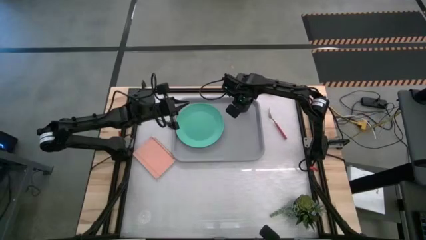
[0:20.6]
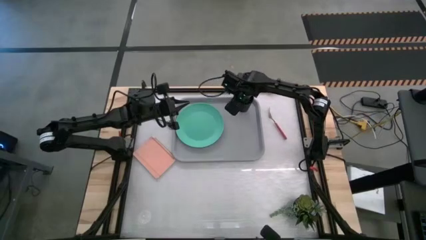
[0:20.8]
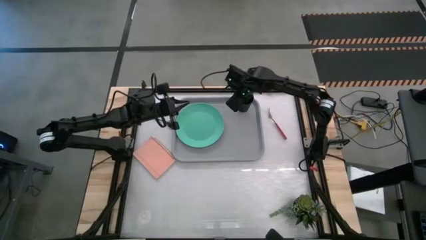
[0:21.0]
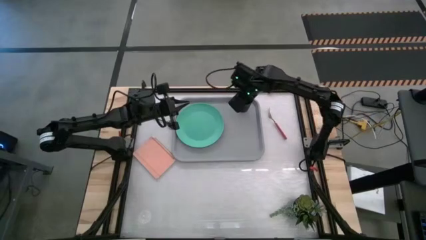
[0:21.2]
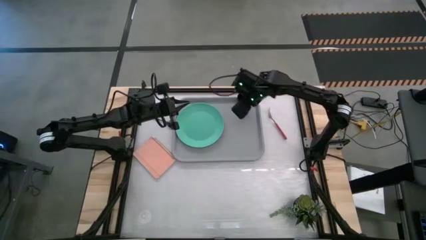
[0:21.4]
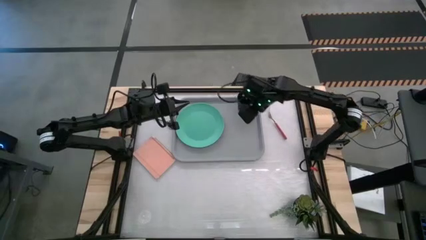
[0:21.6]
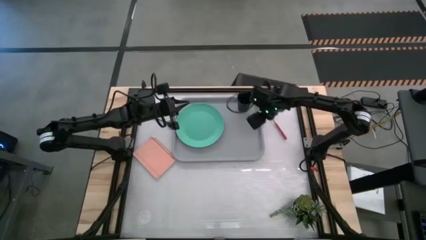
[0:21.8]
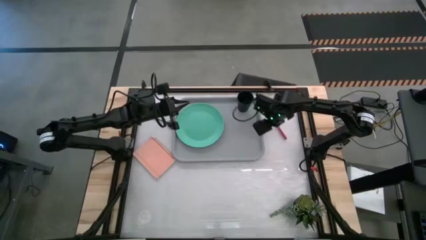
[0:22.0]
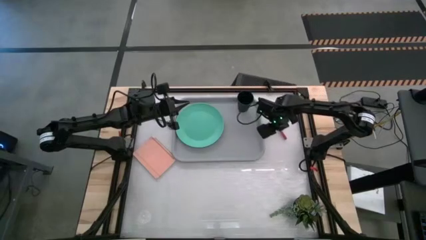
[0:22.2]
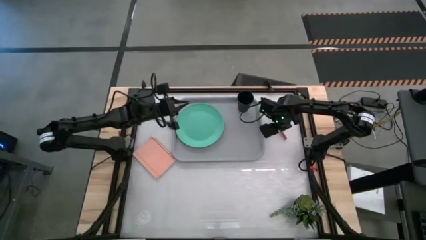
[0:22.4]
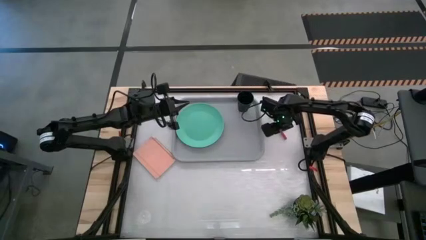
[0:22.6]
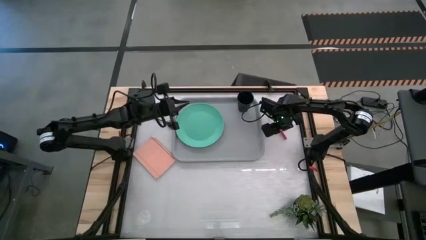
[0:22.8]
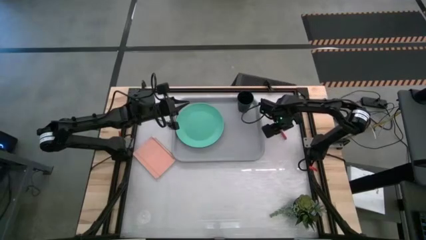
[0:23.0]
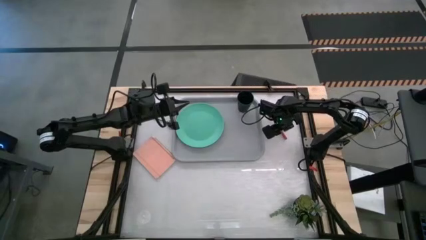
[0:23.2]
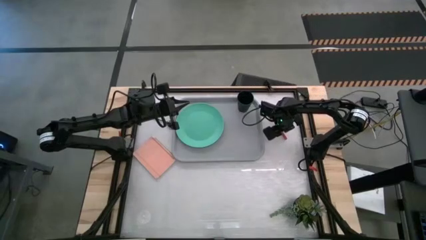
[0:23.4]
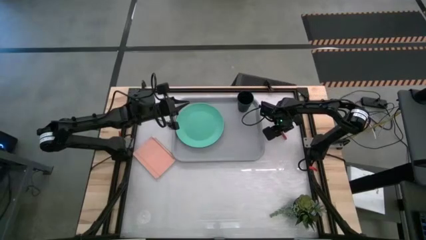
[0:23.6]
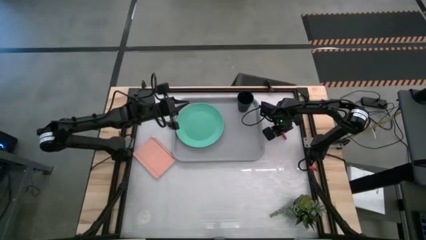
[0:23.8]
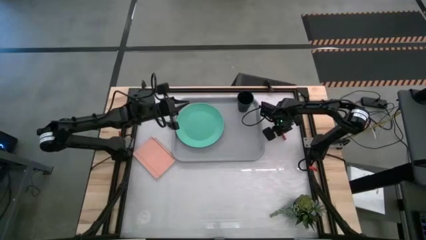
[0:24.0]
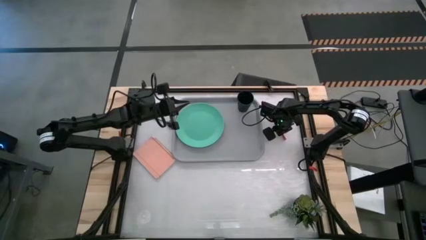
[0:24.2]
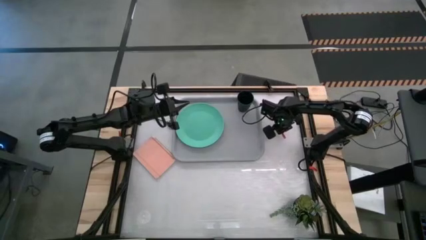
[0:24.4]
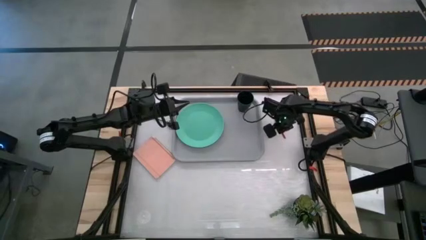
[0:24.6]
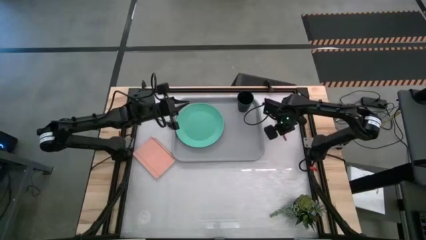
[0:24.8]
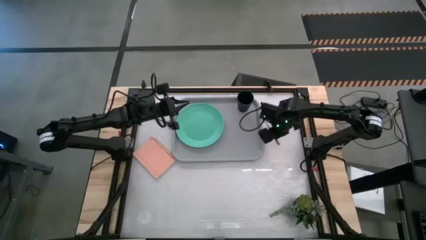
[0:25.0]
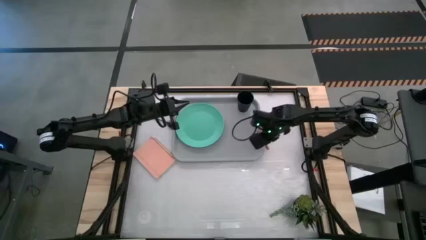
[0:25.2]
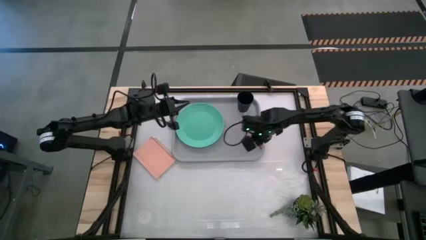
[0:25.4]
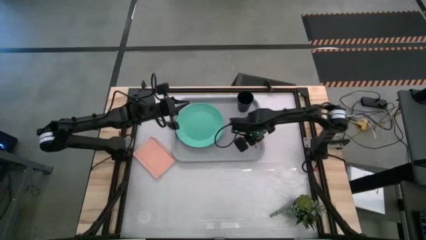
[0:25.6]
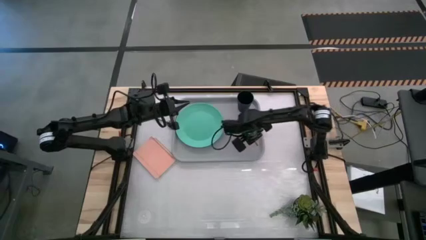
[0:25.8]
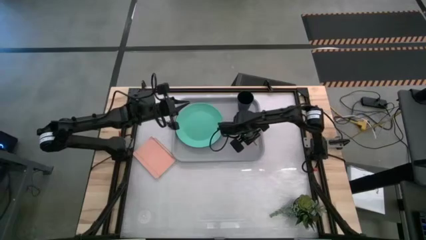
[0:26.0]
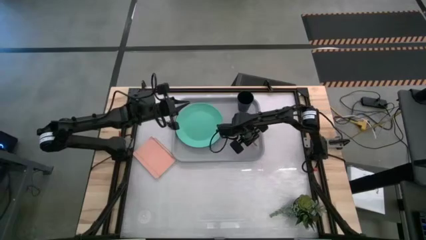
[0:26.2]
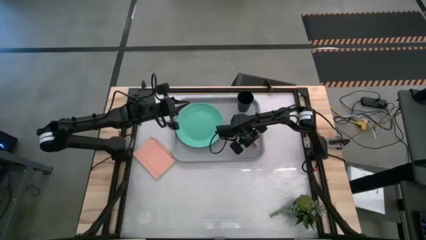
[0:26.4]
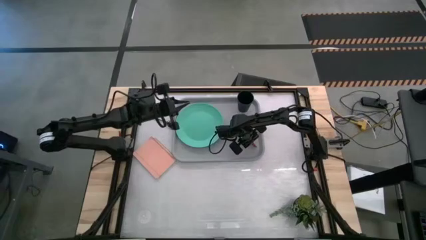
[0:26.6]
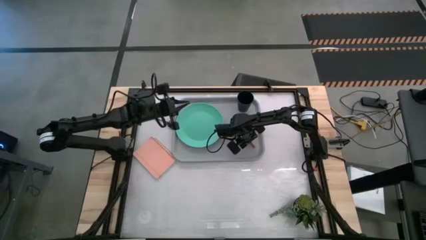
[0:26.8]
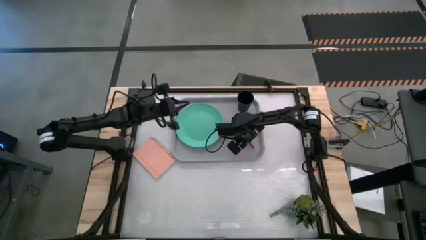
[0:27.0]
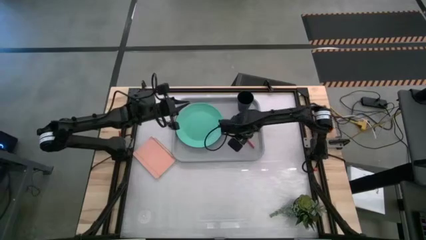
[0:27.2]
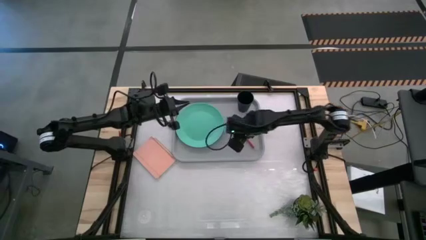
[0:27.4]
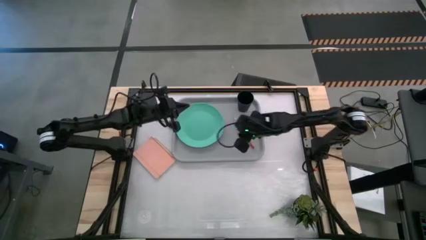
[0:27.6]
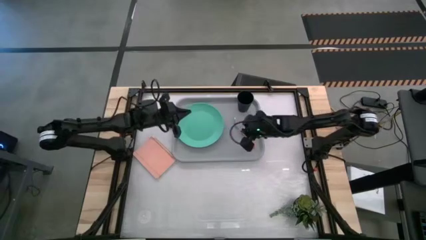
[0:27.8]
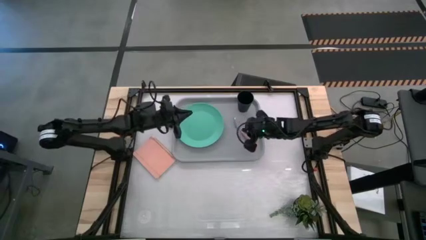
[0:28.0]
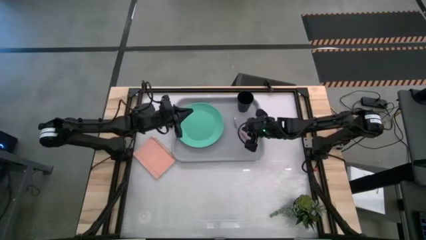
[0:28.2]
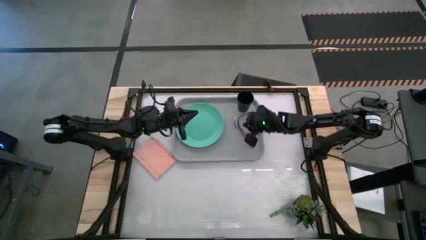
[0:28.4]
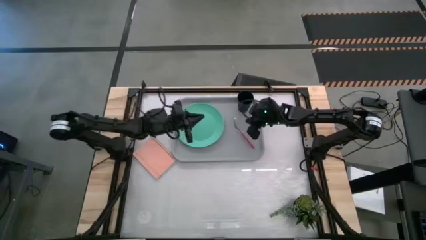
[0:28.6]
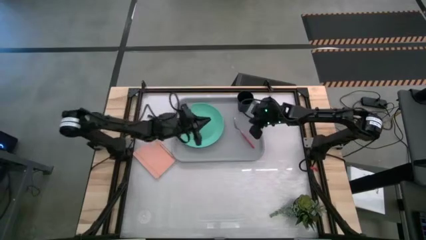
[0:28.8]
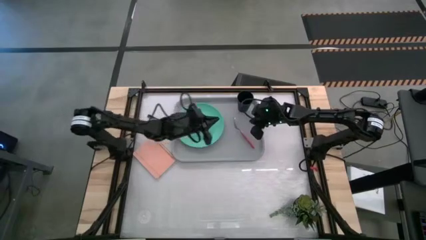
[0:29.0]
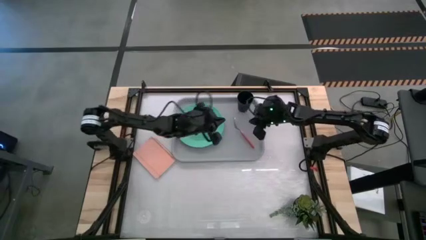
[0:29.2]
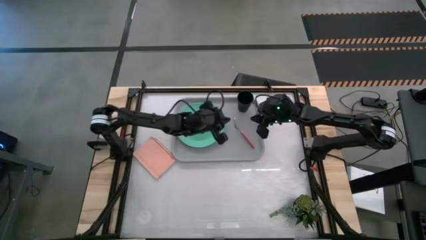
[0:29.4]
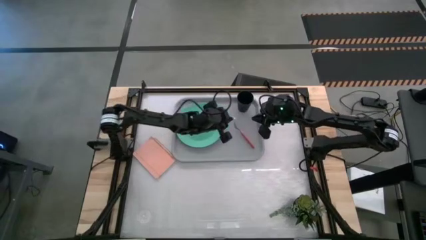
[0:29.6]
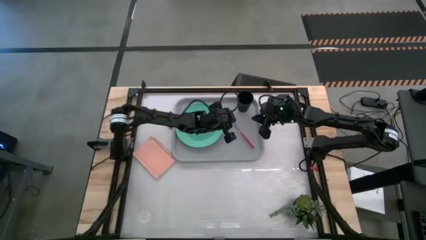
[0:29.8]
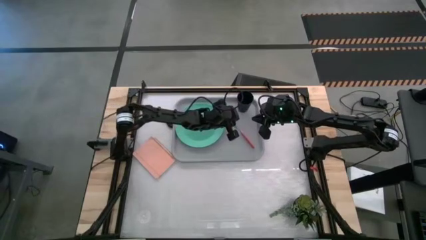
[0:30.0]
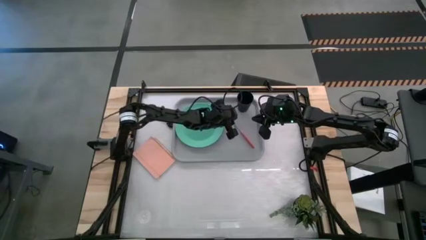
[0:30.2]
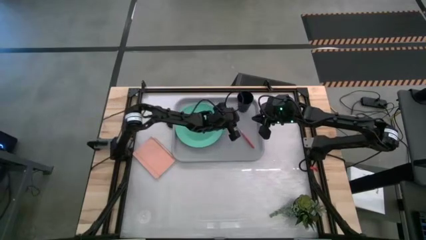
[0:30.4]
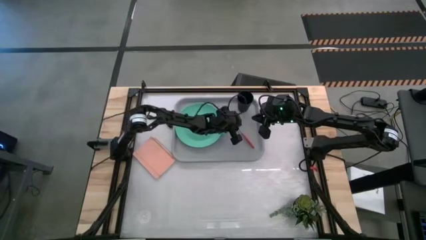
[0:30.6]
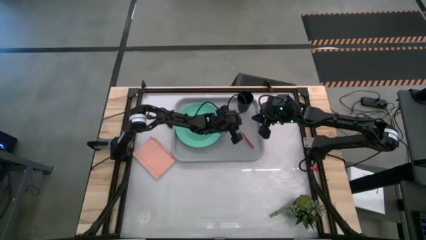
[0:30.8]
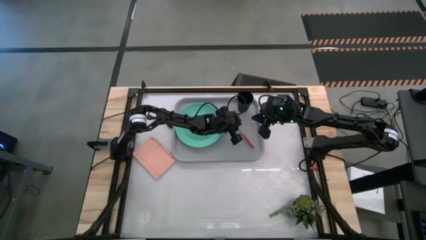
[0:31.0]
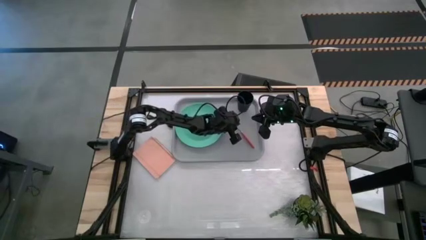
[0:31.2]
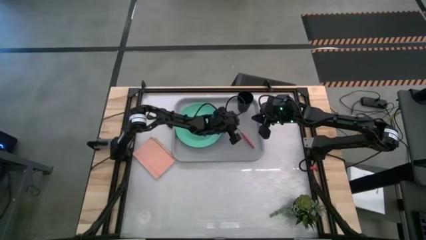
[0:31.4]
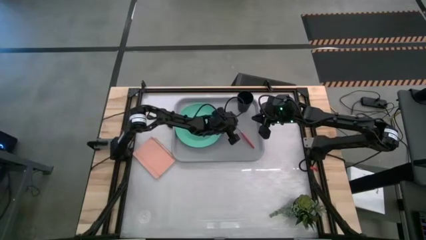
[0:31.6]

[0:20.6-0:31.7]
Task: Pick and place plate/cup/fork/spoon on tray
Put the pink fork on the gray serving tray to the right of the green plate

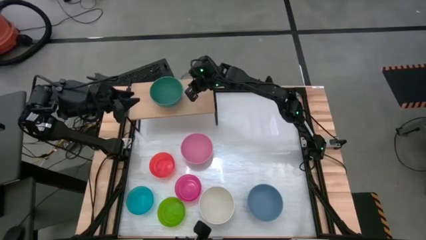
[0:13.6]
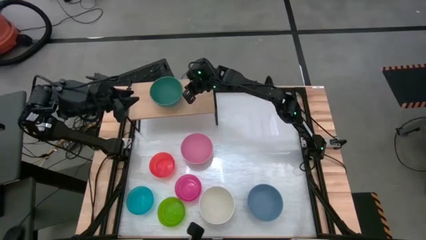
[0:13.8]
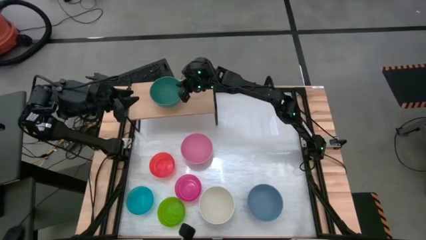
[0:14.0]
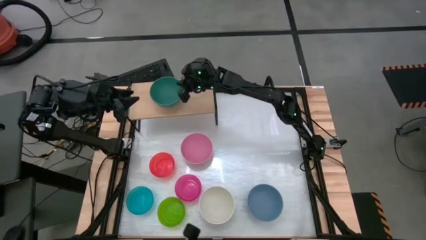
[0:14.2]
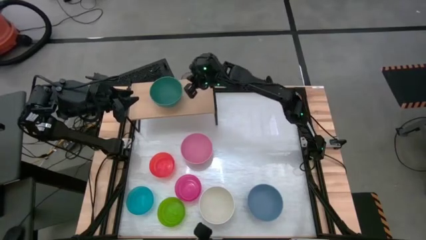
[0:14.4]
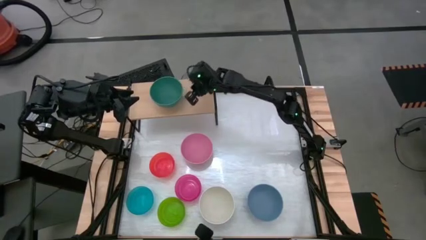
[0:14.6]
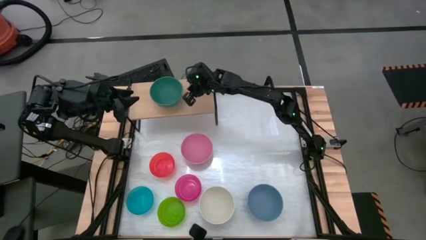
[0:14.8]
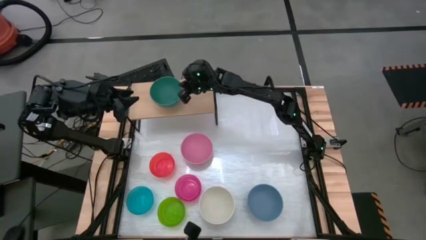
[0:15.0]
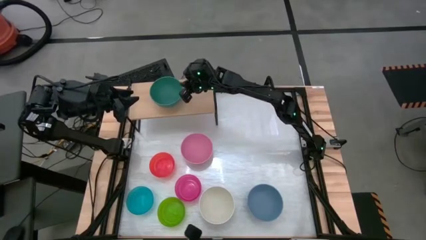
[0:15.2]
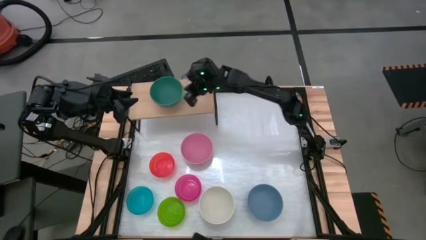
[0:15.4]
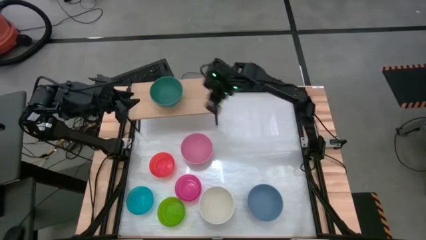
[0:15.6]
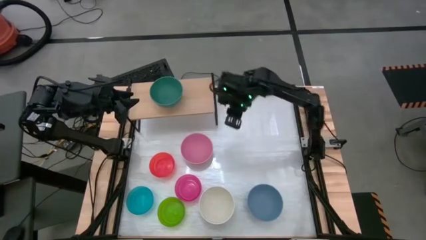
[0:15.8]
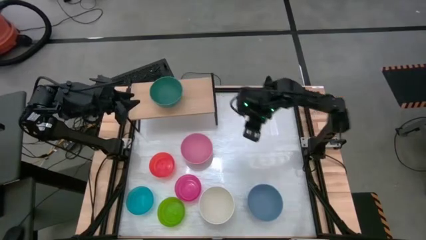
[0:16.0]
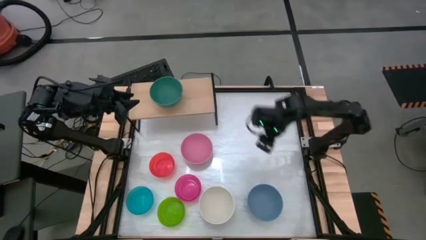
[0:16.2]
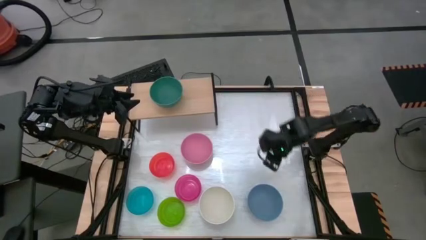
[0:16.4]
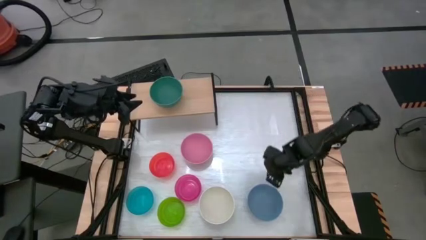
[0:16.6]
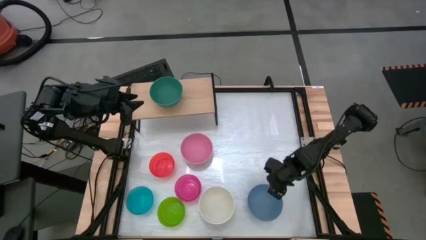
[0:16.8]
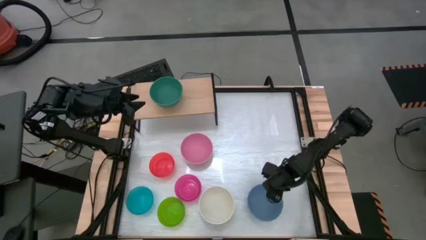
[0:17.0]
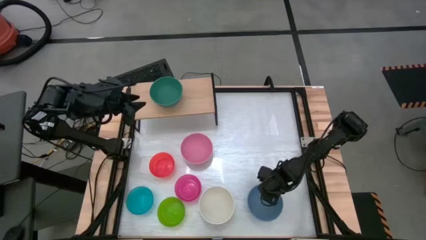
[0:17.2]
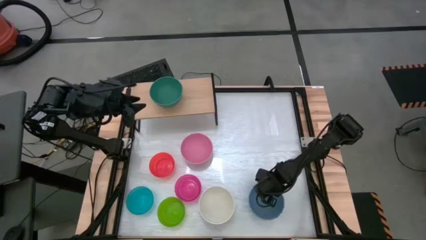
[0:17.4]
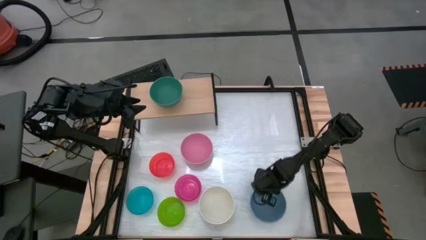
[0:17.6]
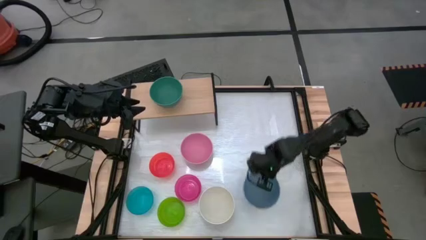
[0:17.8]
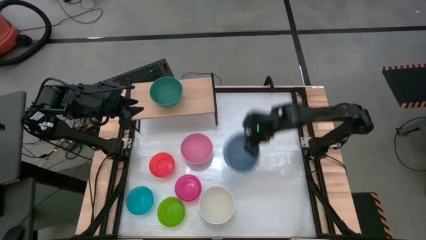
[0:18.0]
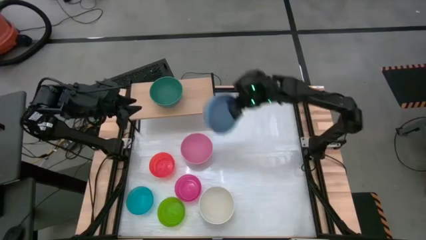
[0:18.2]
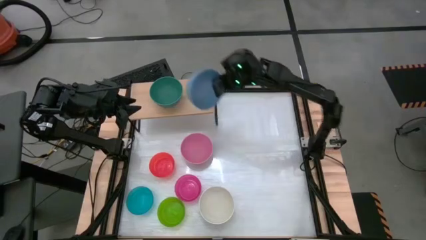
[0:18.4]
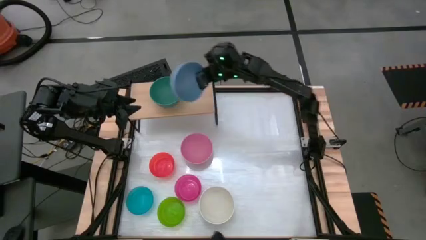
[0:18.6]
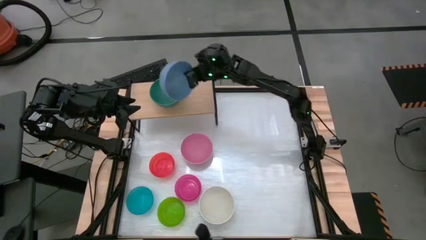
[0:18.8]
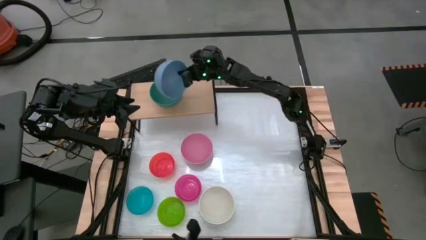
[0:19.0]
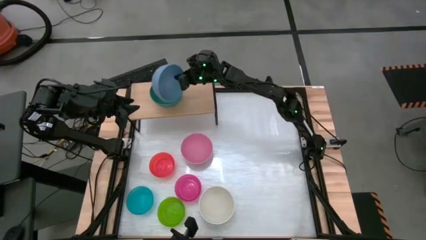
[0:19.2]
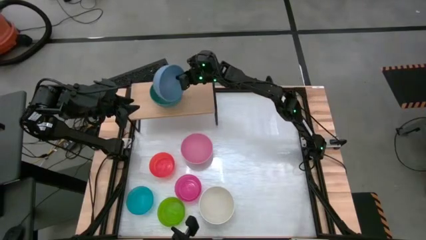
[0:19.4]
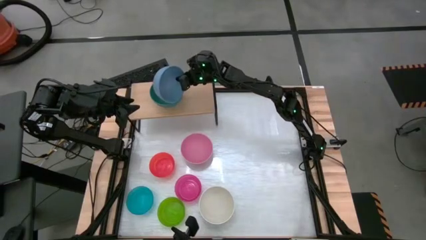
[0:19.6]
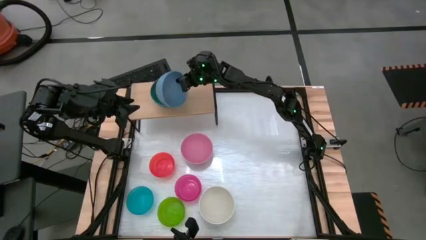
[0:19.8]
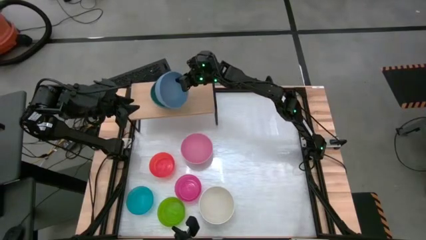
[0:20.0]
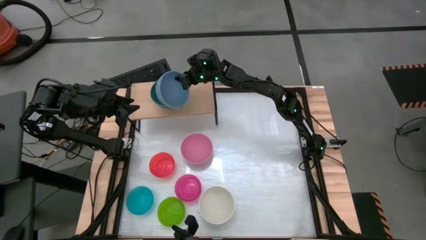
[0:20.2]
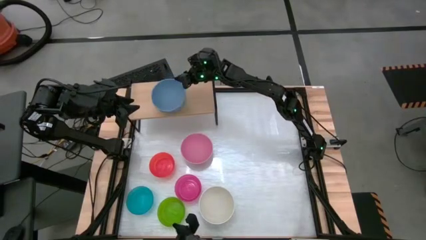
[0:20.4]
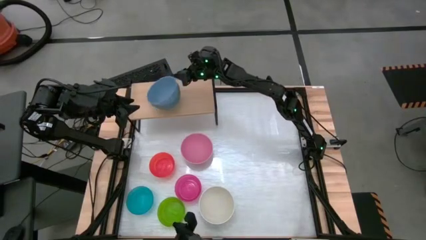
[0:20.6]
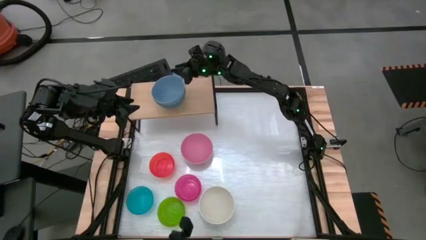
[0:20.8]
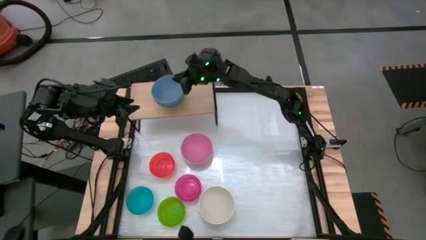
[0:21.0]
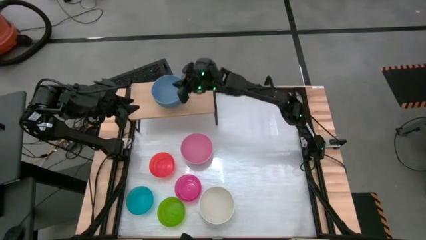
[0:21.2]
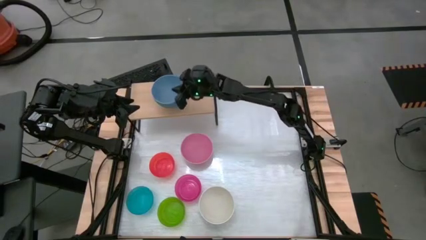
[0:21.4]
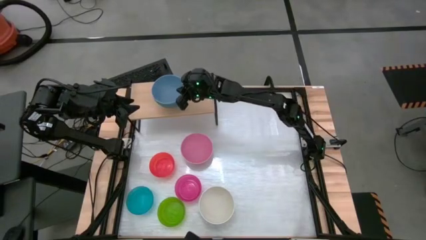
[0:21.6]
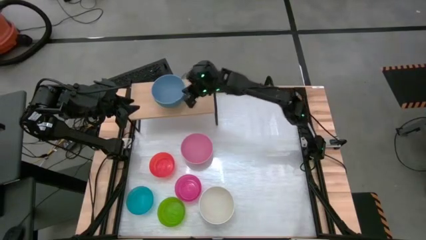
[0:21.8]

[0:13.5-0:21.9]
Task: Place and stack bowls onto a shelf
Stack the large blue bowl on top of the large green bowl on the shelf
